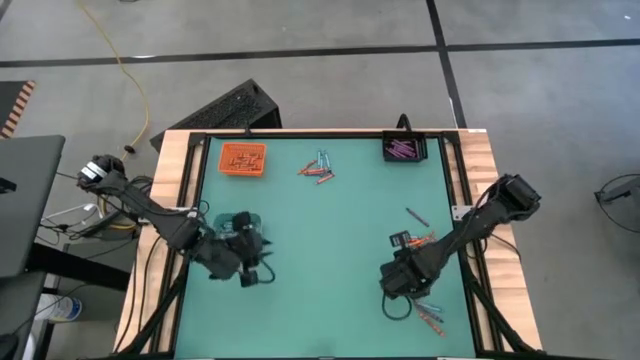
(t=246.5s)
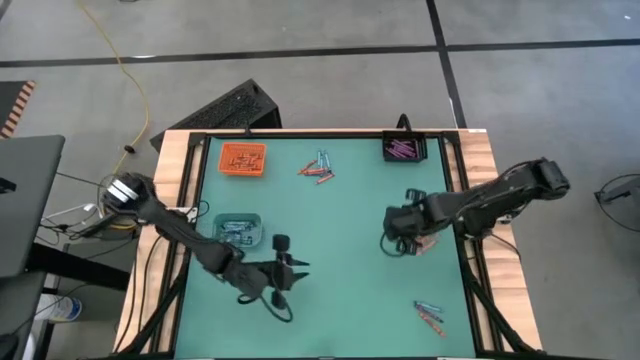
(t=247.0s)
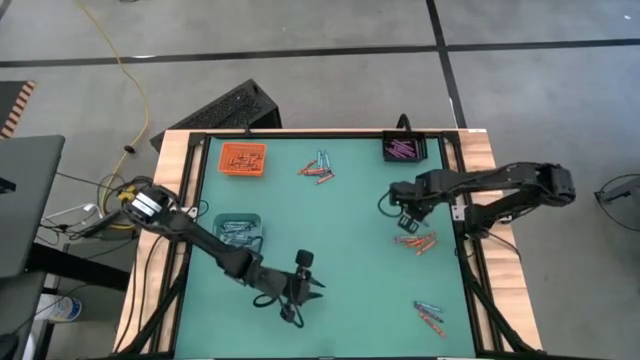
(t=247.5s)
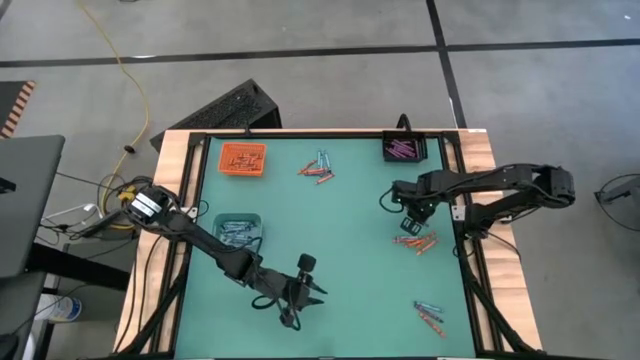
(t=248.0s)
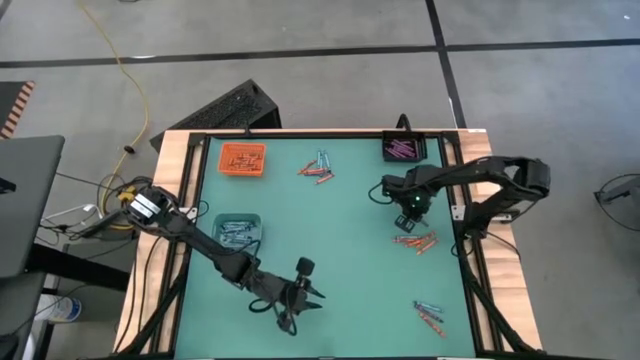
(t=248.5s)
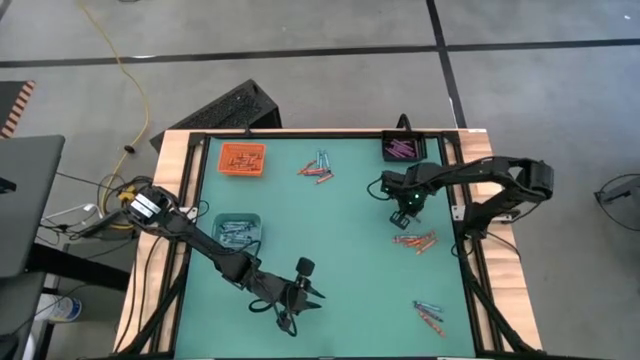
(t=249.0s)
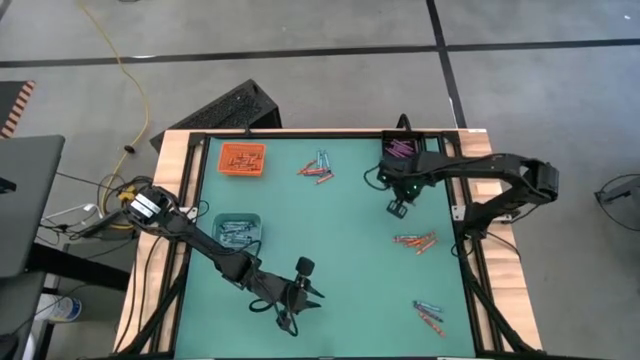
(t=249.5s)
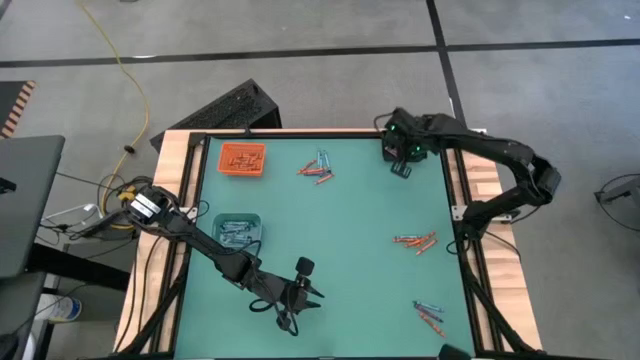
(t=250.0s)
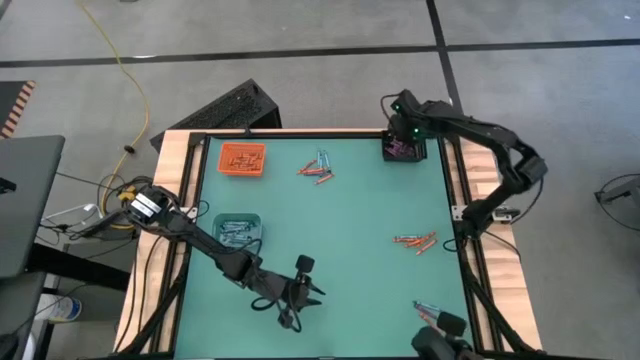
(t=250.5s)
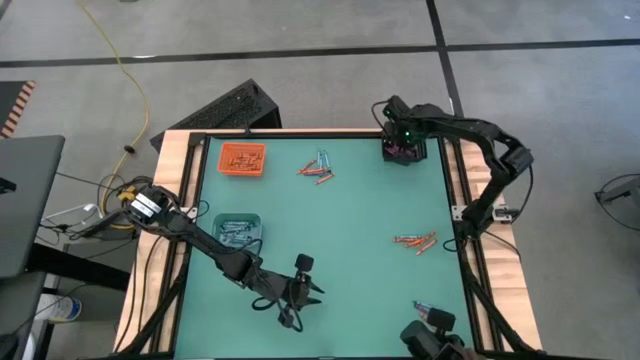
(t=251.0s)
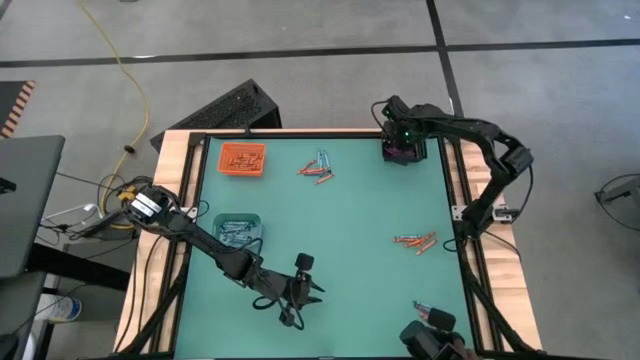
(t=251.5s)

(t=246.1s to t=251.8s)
Task: Sort crayons
Put the purple crayon into the black basket

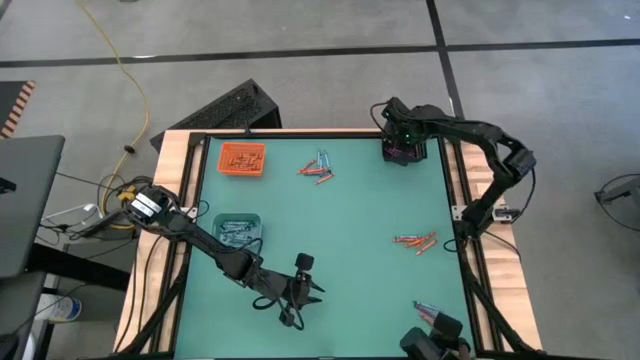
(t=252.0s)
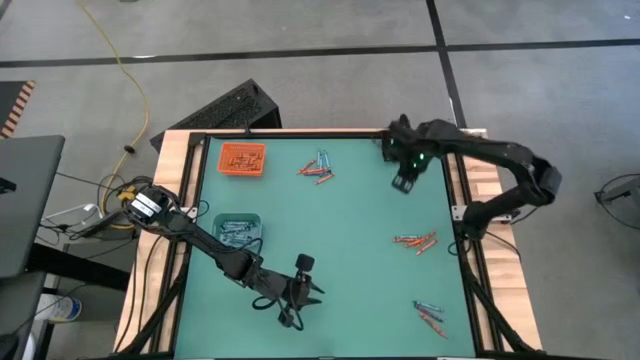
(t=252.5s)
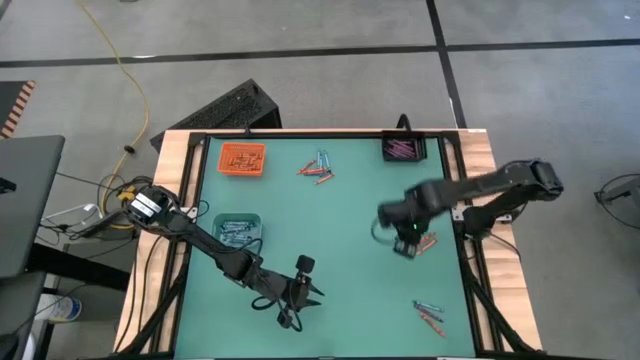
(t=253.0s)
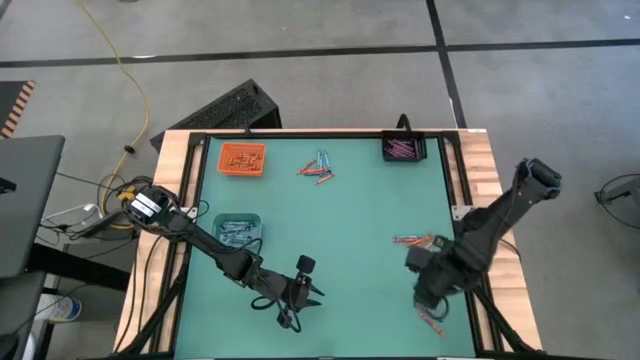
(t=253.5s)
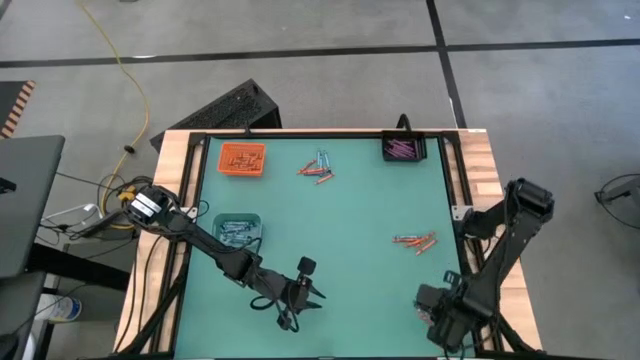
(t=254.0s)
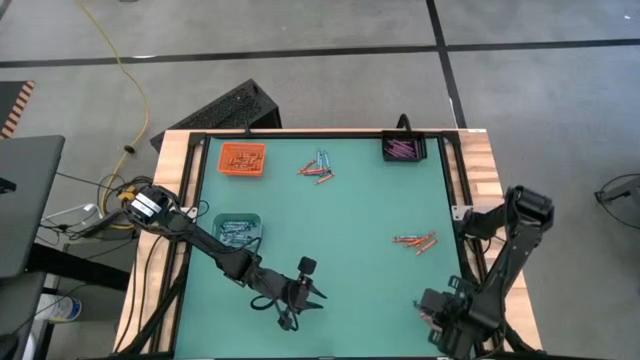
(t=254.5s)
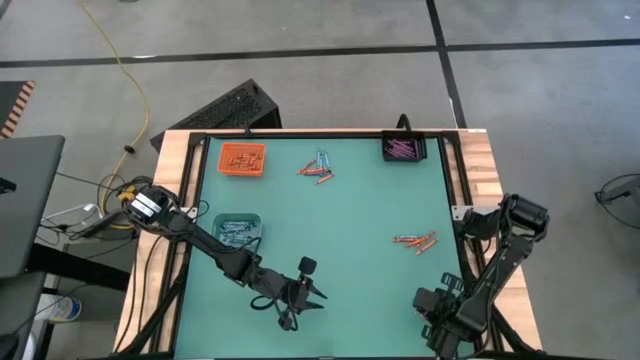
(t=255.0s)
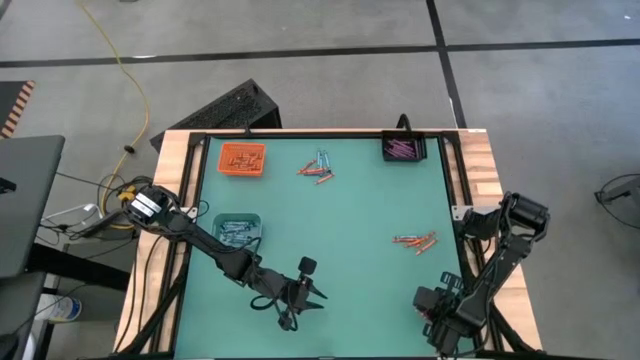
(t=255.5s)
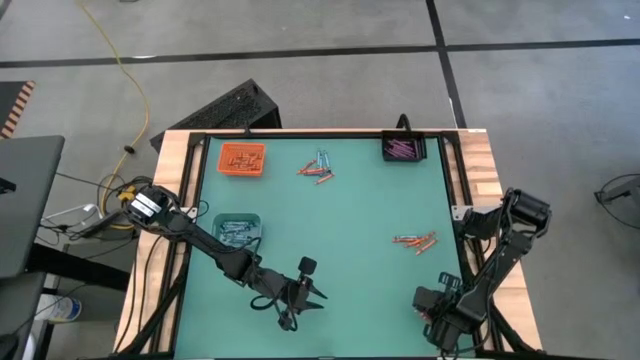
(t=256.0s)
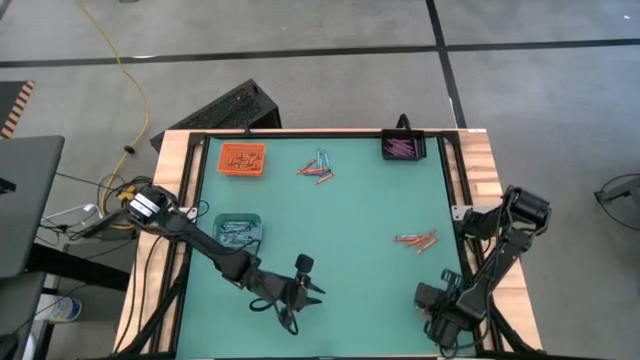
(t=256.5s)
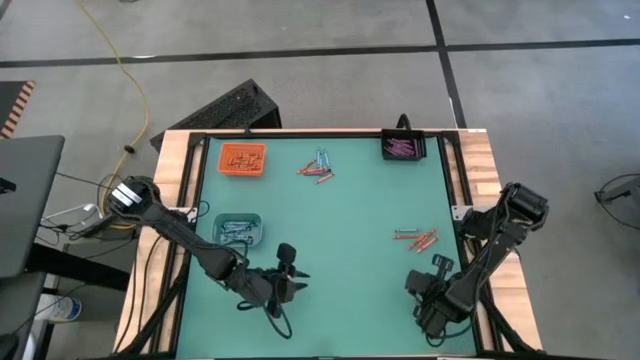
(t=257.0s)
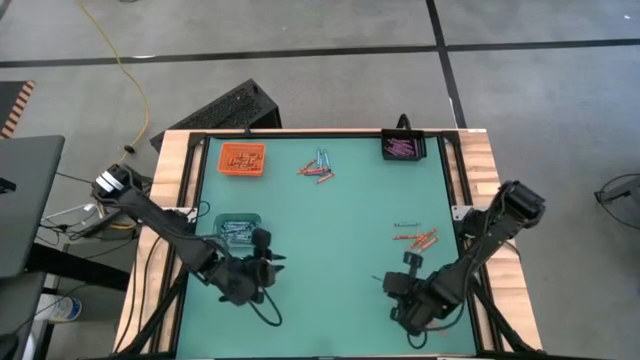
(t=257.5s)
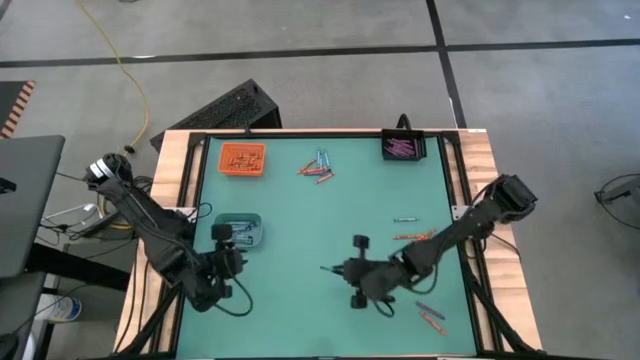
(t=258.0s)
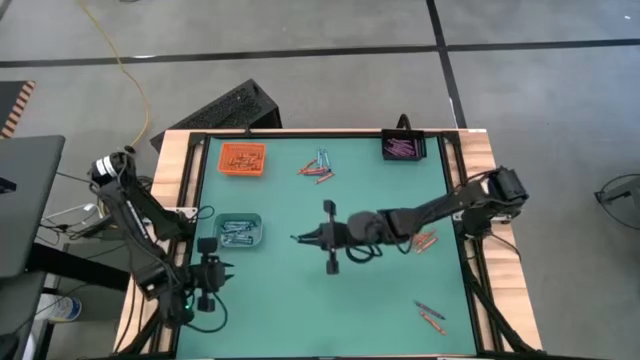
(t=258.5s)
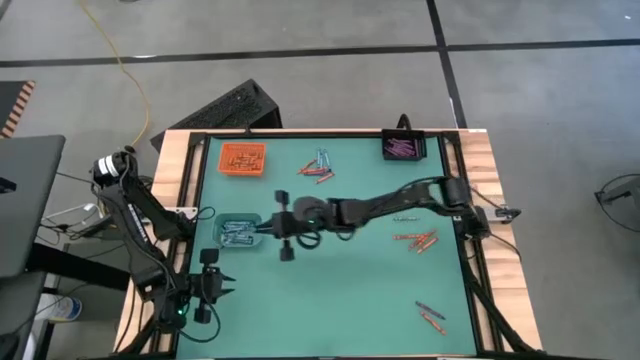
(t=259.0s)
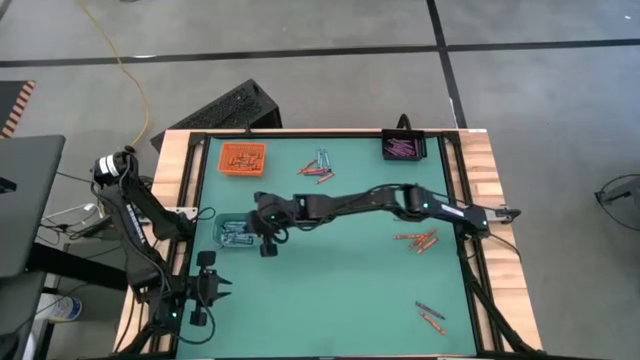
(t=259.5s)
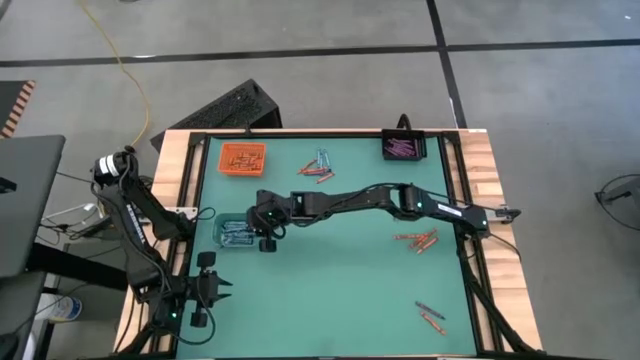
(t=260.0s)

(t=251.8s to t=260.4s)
Put the blue crayon into the blue bin

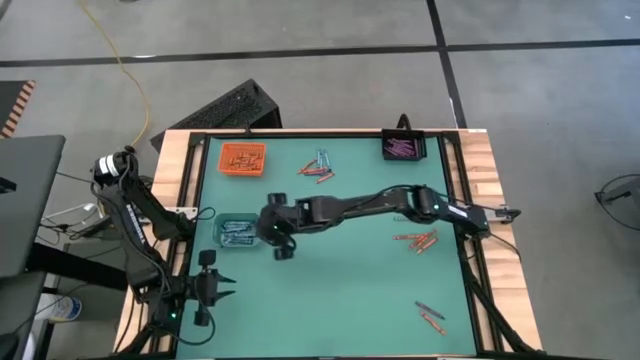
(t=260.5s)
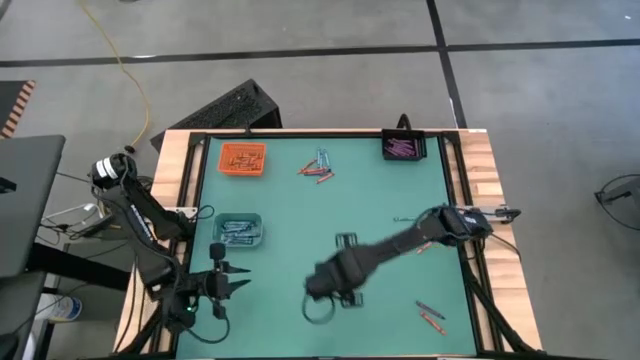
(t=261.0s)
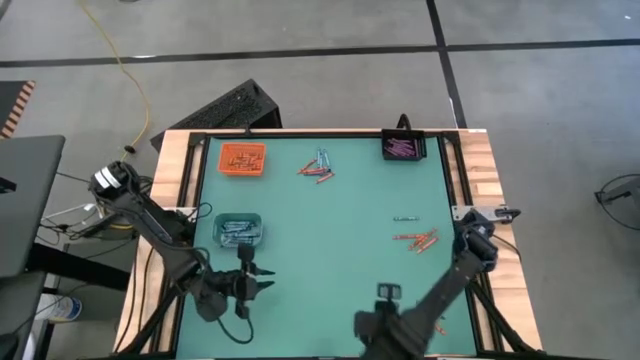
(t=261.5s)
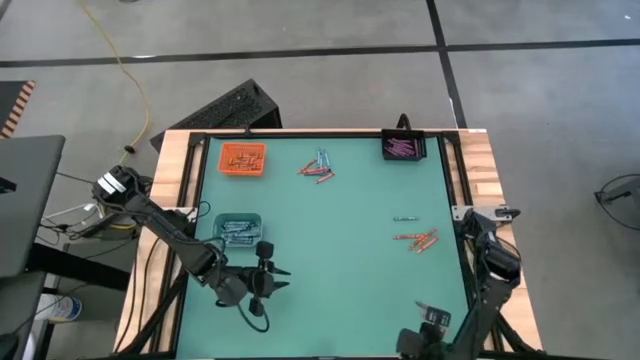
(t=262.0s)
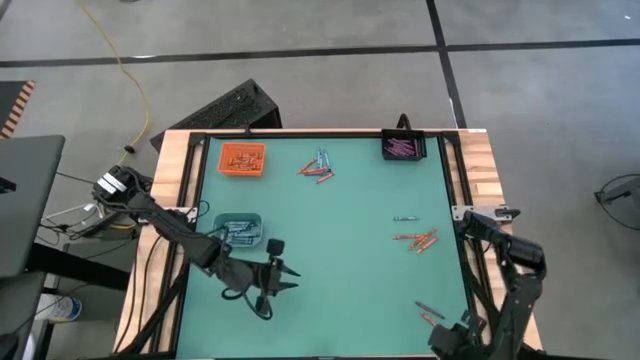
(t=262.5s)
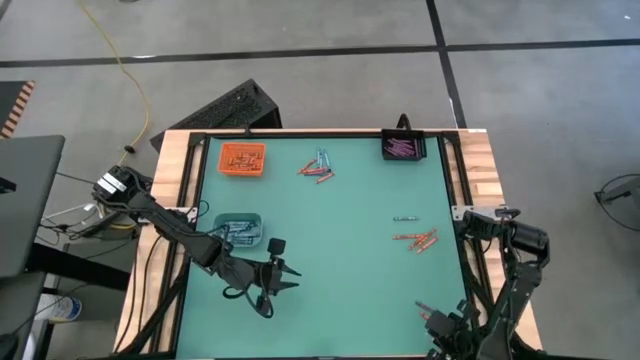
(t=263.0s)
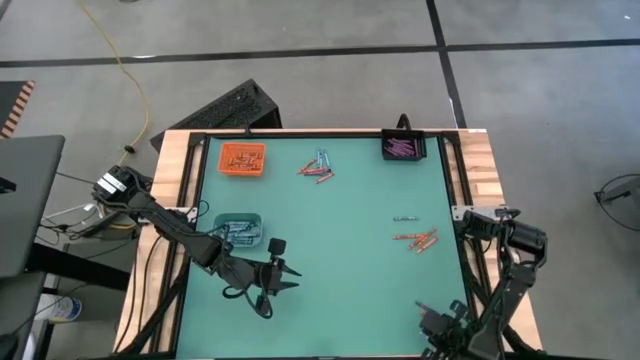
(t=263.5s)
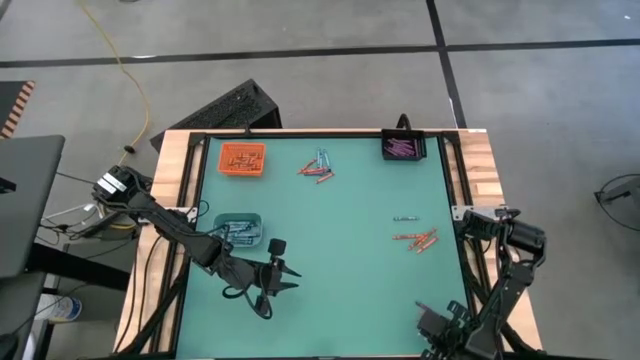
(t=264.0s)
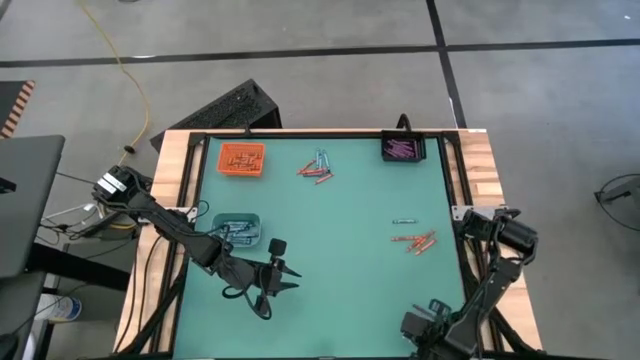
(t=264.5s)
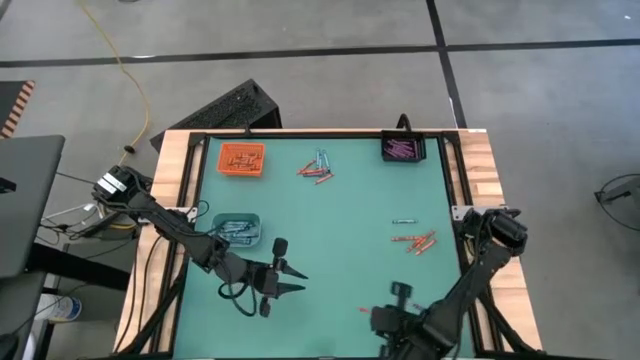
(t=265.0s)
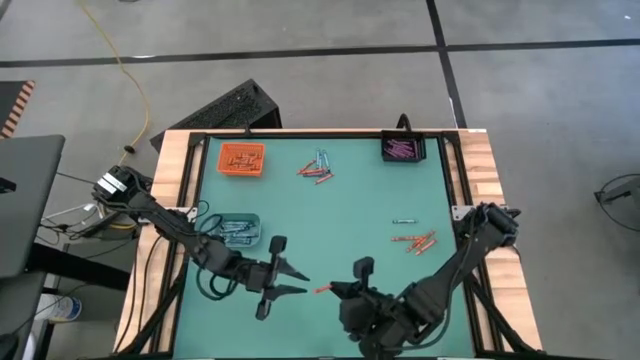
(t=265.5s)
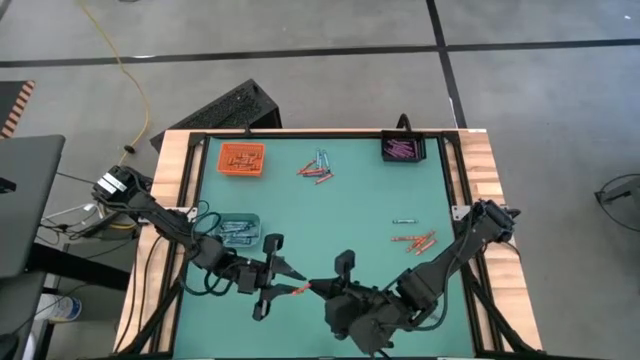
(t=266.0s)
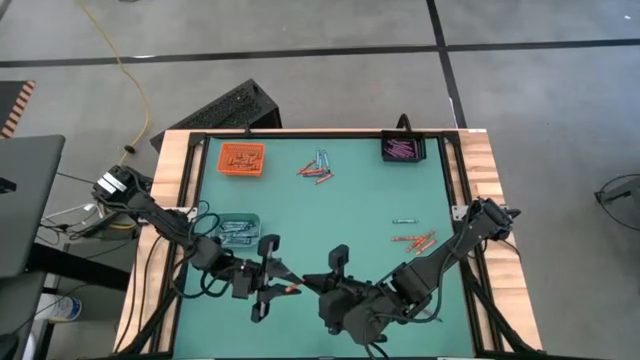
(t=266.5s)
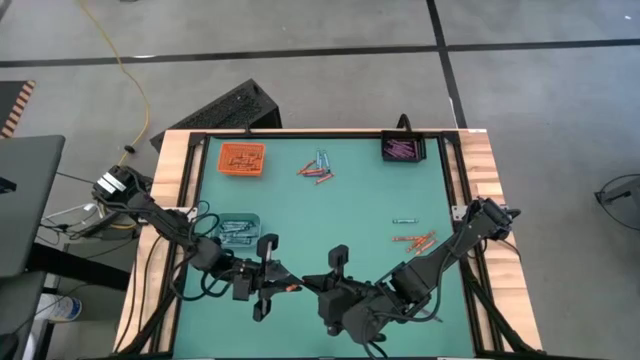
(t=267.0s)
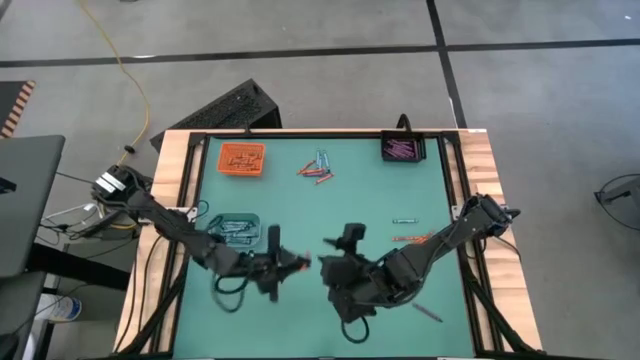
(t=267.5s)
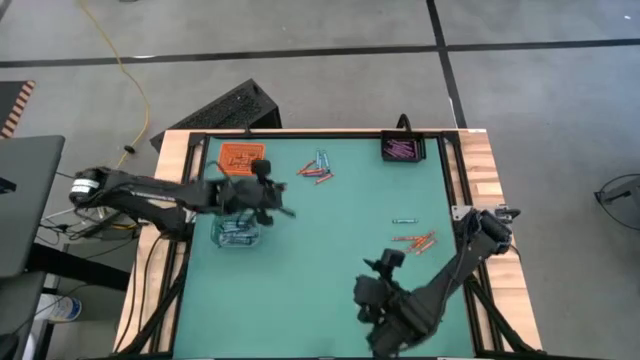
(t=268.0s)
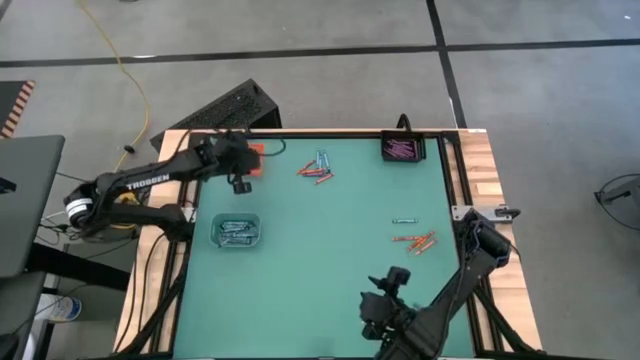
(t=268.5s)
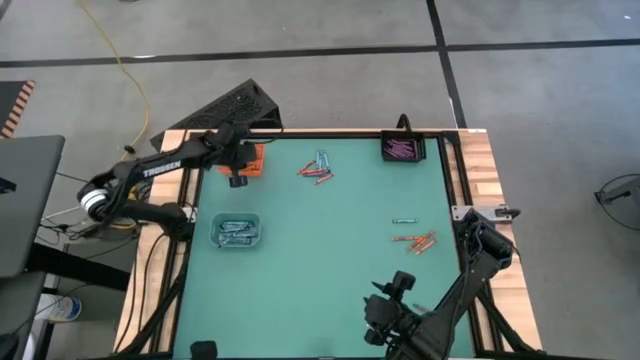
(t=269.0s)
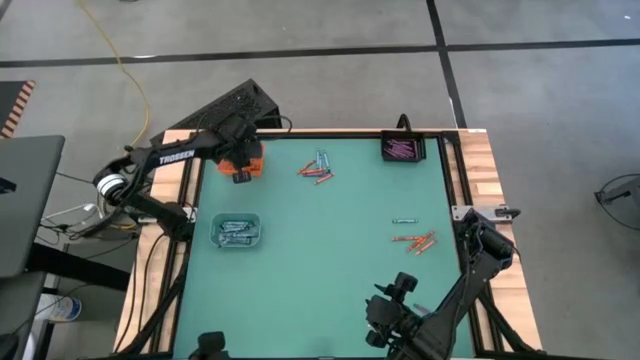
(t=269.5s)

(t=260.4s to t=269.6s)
Put the orange crayon into the orange basket
